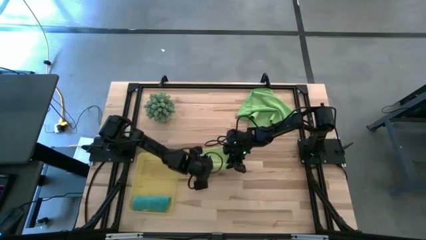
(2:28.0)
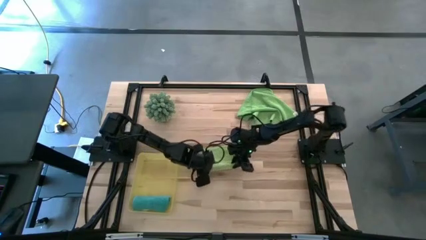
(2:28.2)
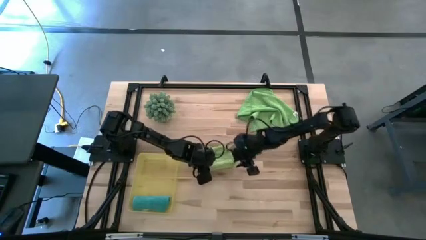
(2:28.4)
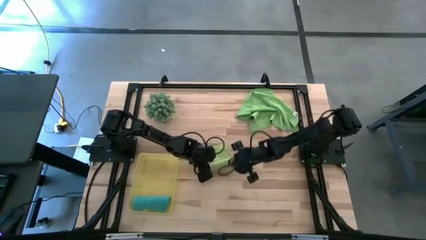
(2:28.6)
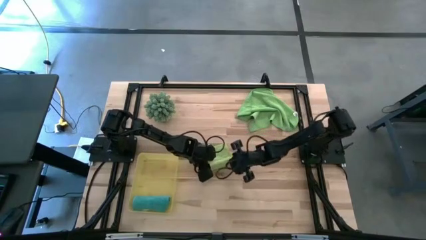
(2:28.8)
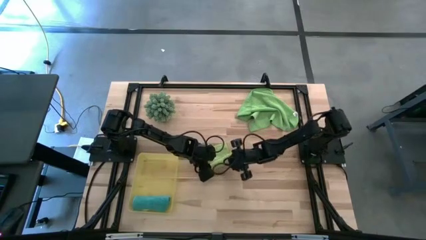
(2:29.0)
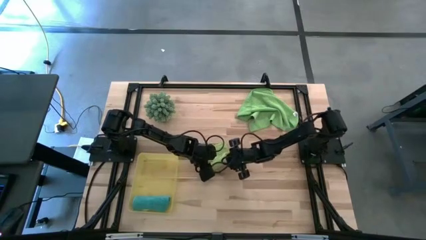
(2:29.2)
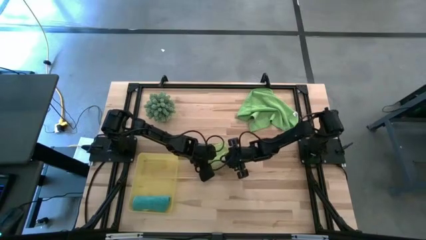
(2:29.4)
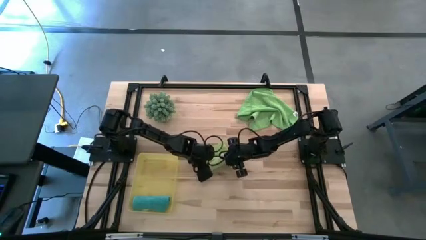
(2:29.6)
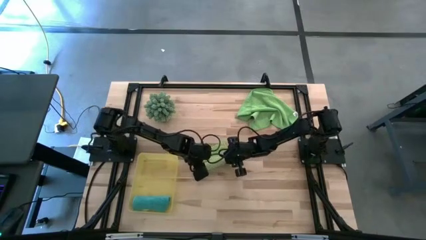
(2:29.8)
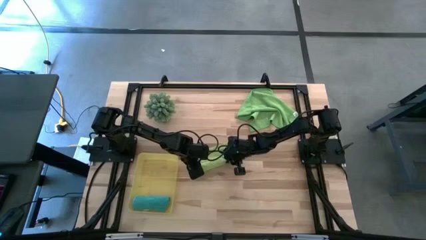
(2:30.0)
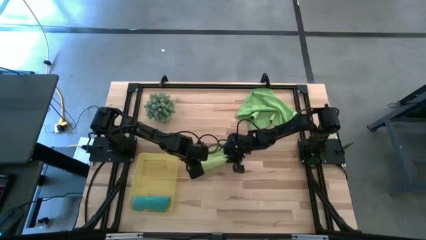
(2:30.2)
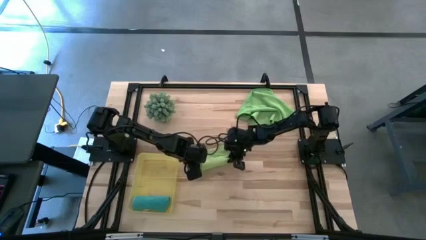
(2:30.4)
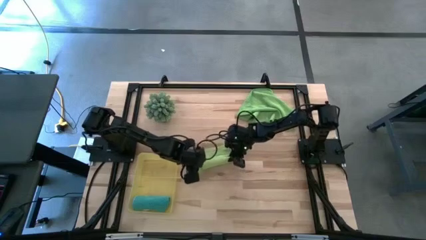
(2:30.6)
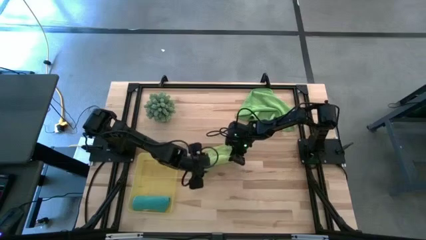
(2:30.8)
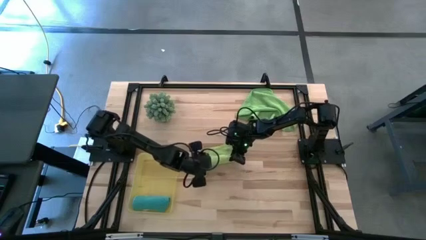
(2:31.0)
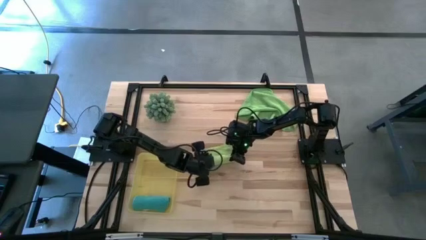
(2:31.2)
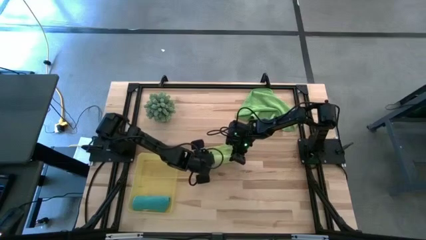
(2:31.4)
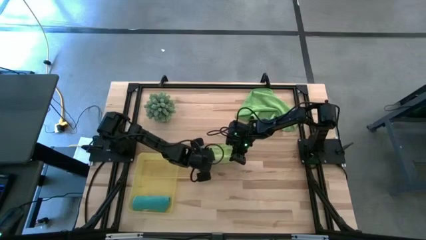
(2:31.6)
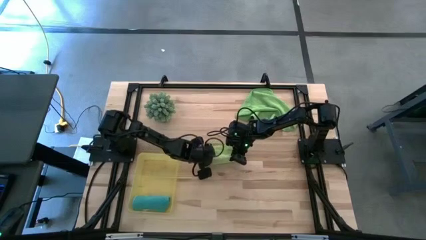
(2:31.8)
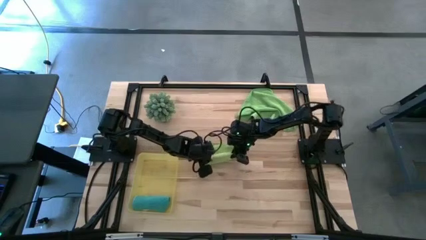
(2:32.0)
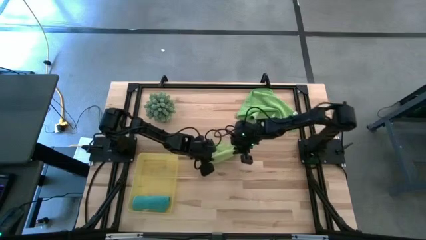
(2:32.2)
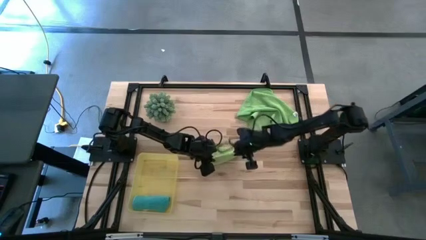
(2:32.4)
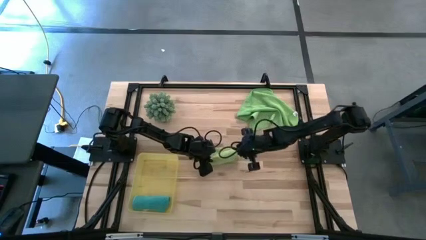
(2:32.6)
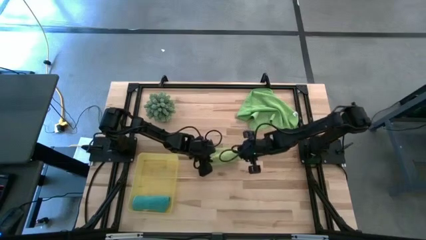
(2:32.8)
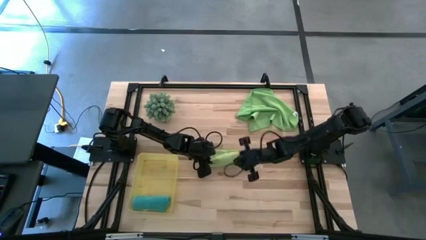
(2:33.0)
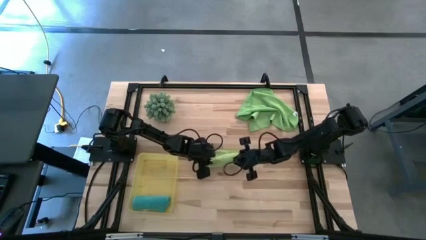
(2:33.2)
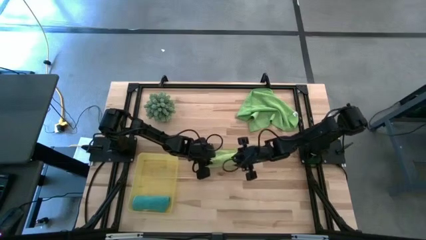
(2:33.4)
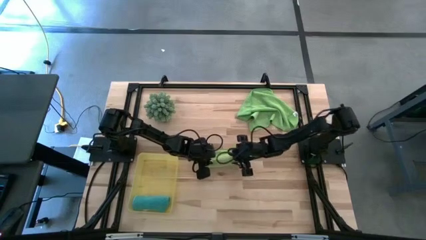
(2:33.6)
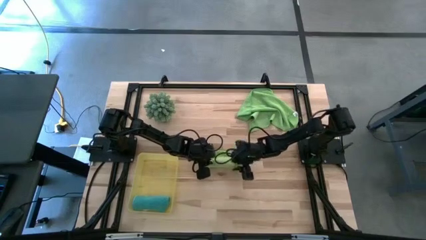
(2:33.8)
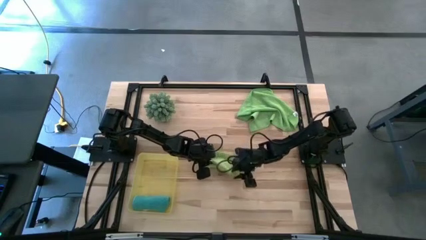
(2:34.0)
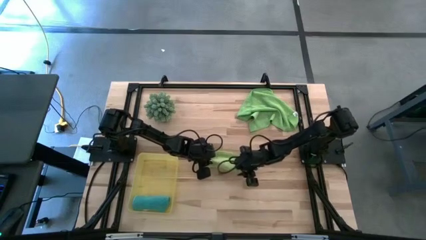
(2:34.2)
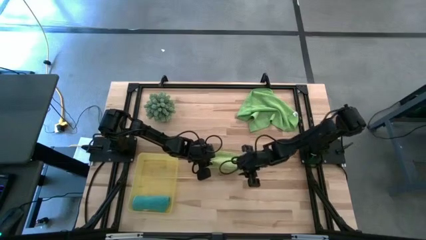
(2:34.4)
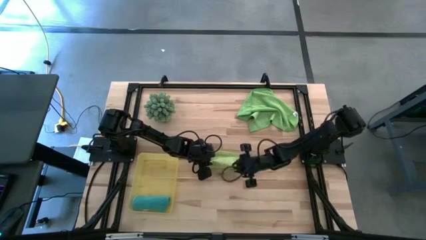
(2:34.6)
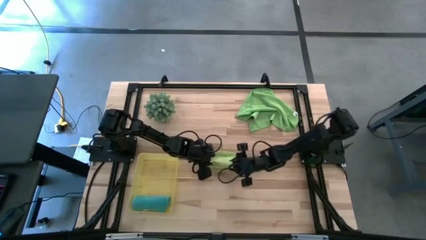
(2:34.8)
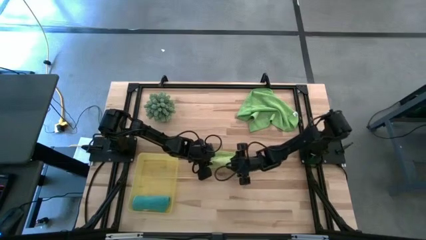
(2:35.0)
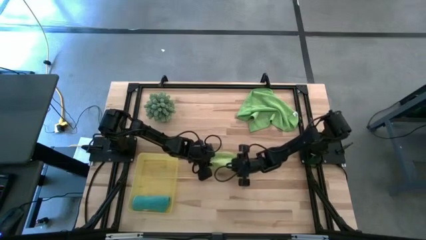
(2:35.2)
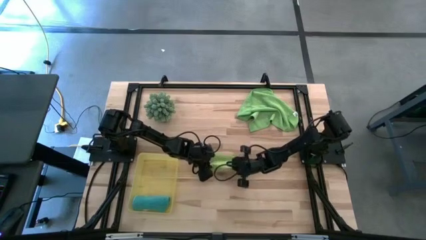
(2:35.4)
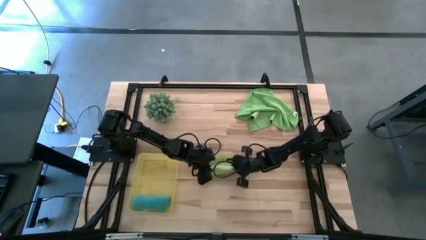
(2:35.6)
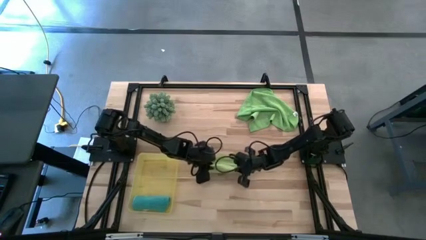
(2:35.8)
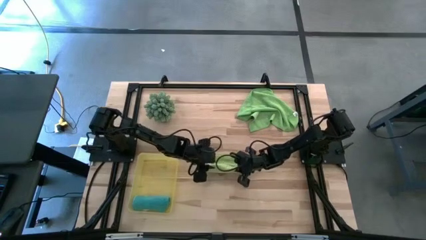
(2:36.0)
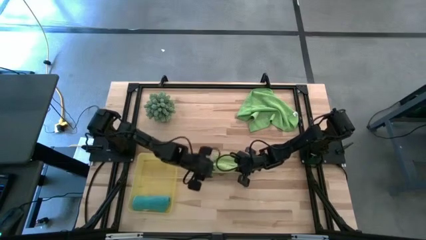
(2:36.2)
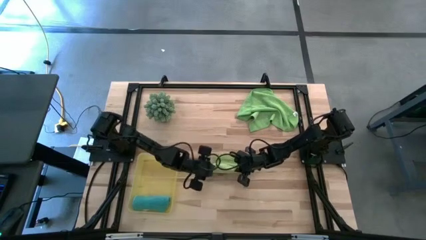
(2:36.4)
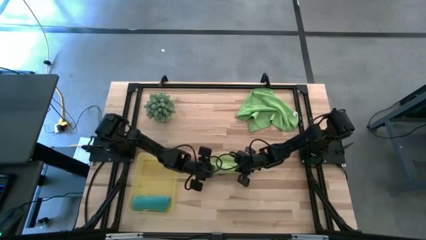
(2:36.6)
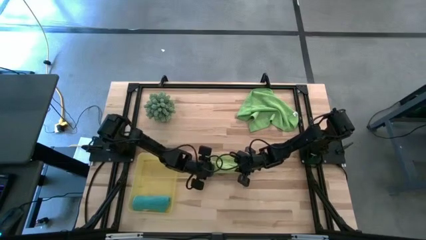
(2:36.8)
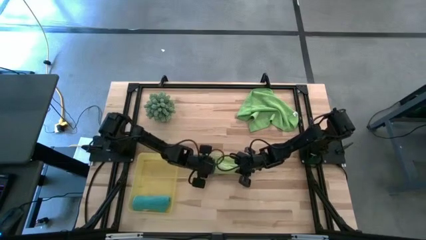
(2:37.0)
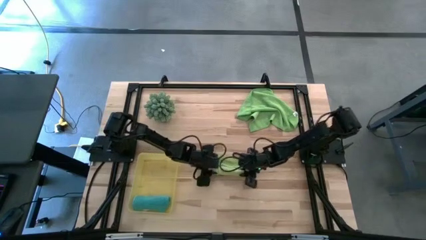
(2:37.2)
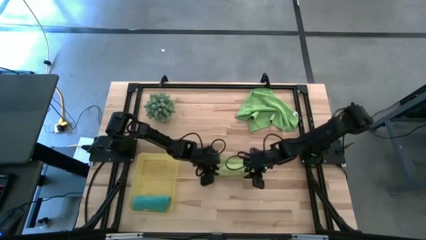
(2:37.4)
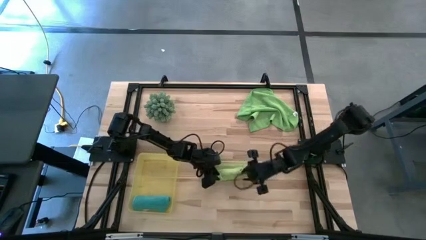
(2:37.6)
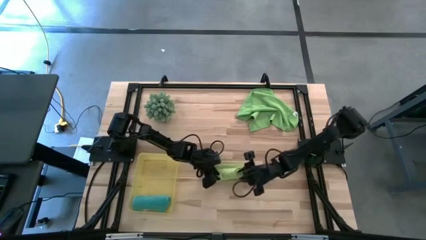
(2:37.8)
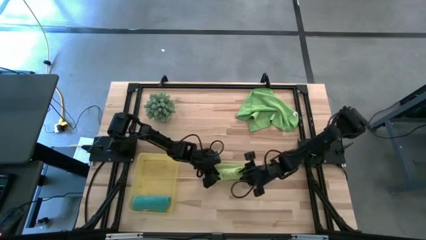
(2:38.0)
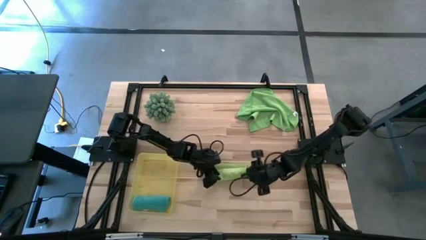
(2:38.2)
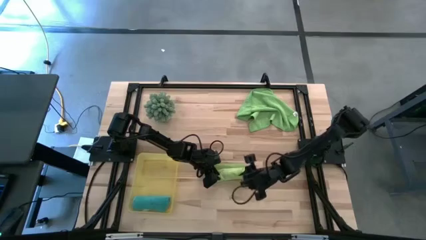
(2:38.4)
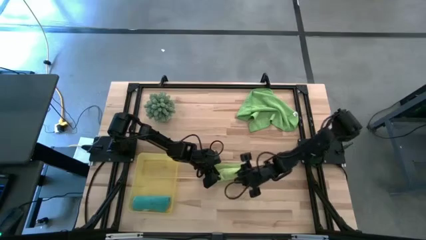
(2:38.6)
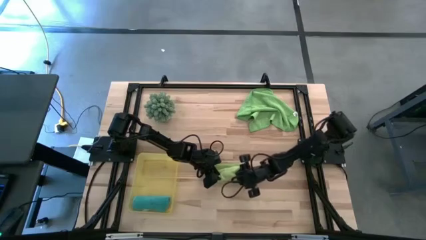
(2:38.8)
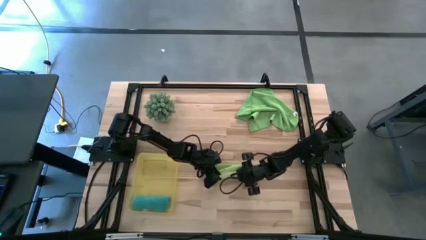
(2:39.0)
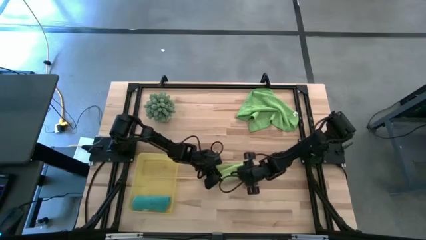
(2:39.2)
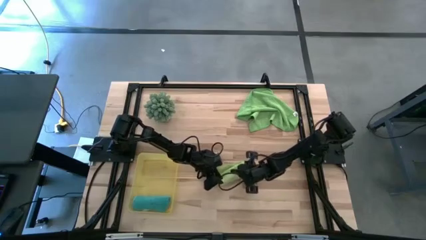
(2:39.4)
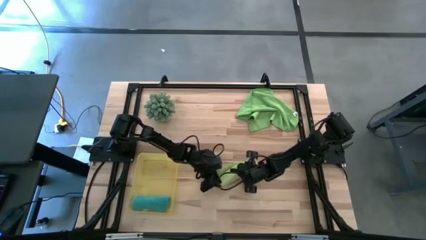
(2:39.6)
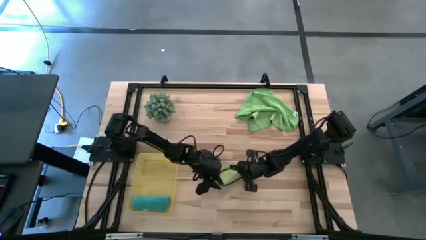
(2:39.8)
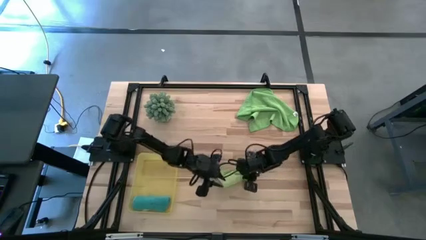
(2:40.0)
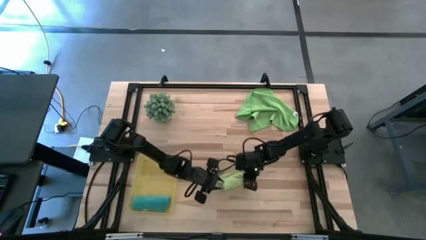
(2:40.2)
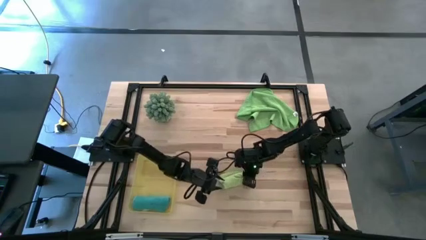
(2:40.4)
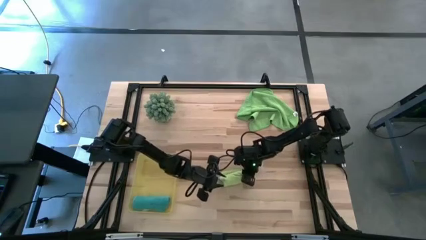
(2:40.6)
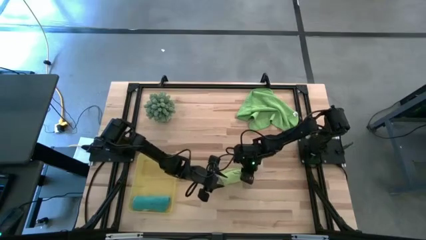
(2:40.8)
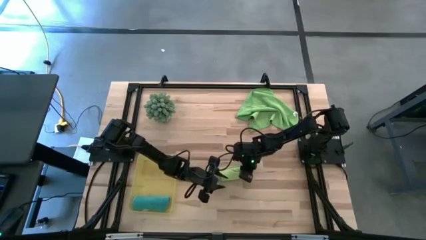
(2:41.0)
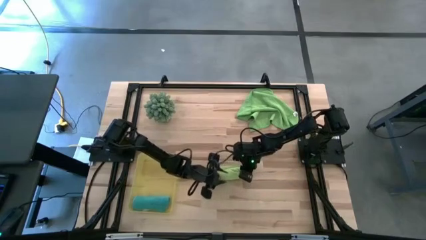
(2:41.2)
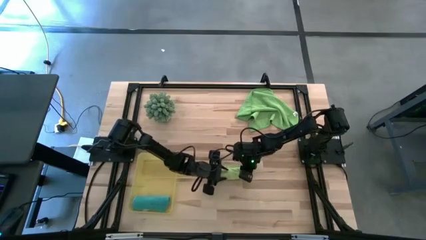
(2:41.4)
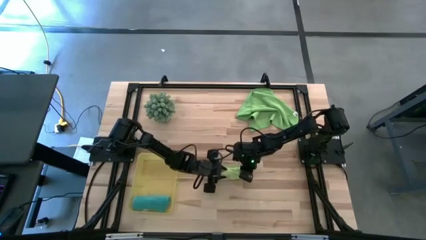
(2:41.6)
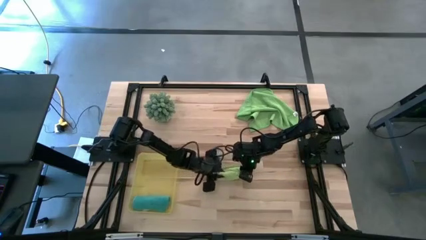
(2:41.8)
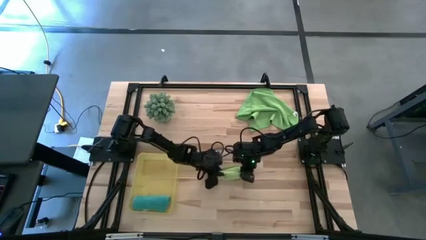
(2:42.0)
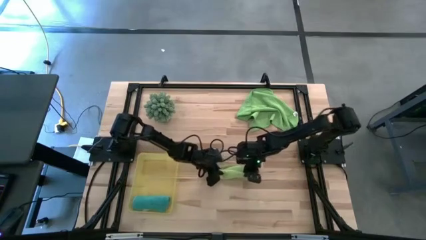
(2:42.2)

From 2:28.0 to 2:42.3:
Task: Roll microfiber towels into tight, uniform cylinder then place into a basket
Roll the light green towel

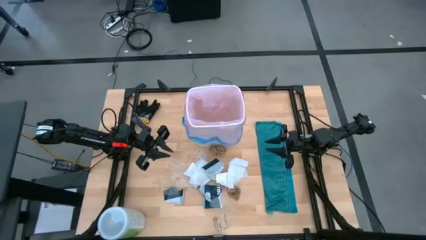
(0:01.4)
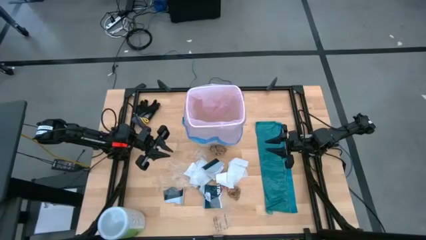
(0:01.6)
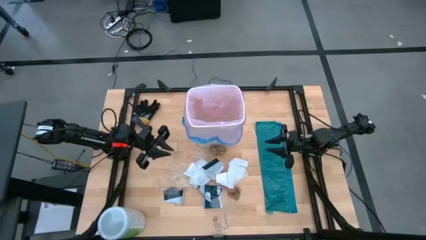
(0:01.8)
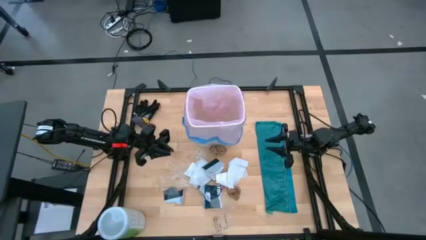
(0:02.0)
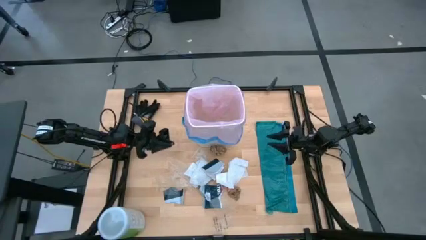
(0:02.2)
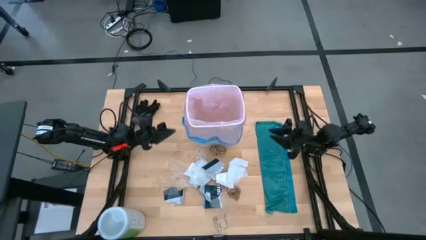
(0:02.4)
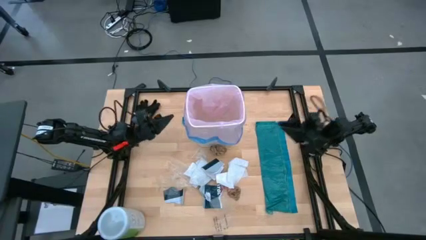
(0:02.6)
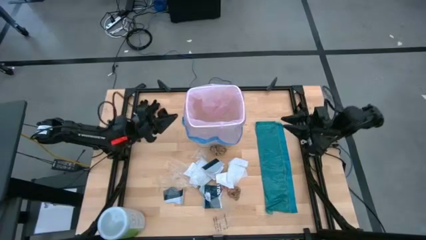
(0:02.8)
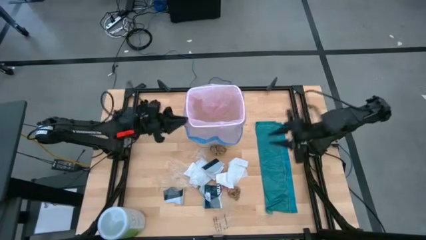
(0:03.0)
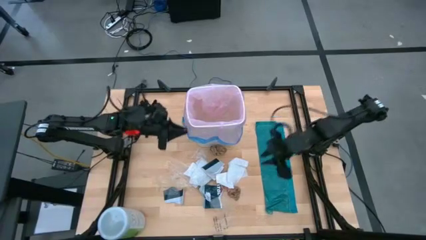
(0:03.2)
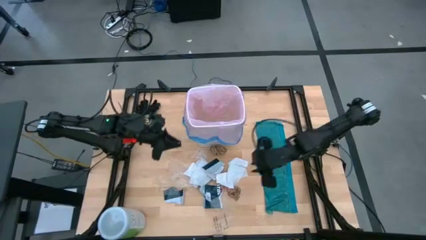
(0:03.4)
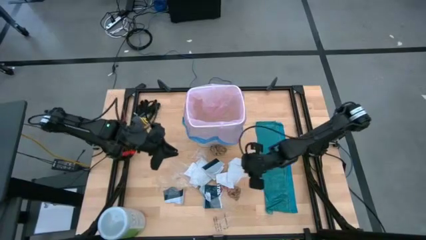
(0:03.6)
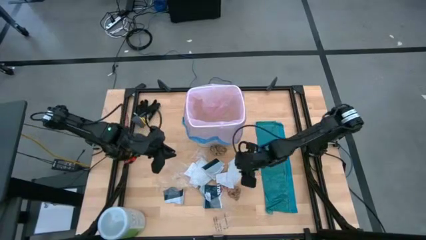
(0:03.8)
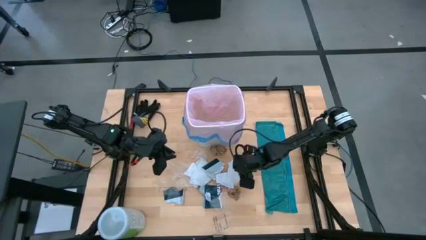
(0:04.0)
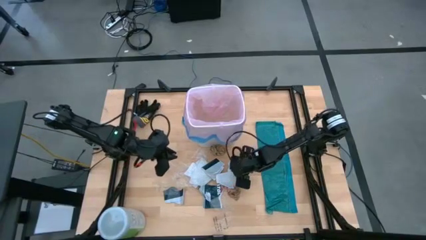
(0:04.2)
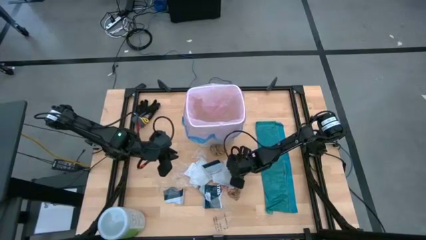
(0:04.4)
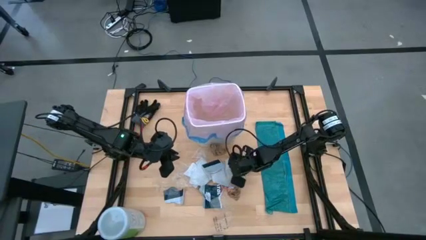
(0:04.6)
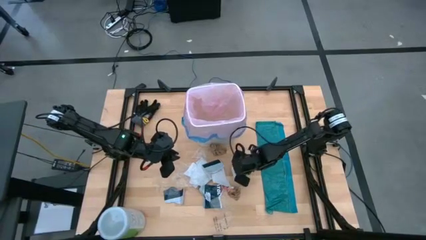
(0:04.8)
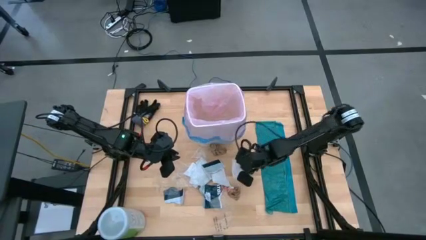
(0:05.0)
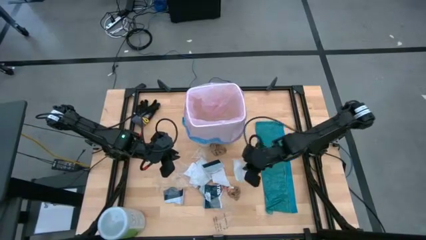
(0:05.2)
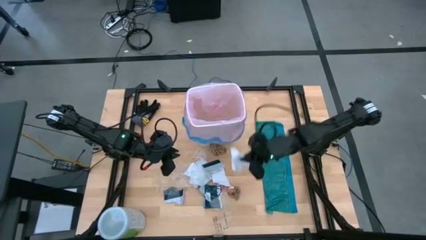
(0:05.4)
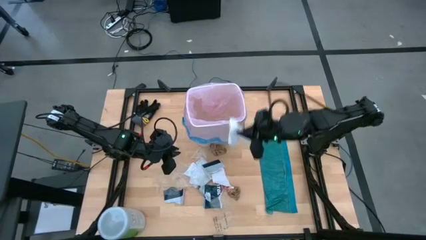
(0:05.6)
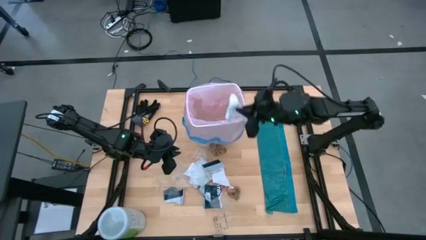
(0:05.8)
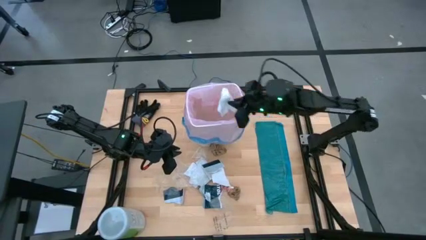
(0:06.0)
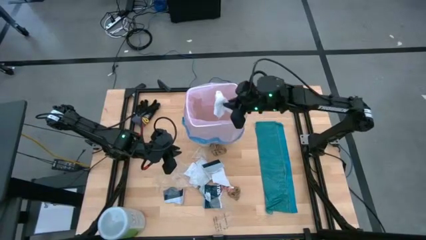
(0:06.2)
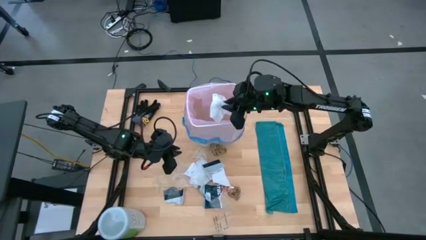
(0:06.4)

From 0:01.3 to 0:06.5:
Task: place trash/remove bag and relplace
Put the white tissue paper into the white trash bin
